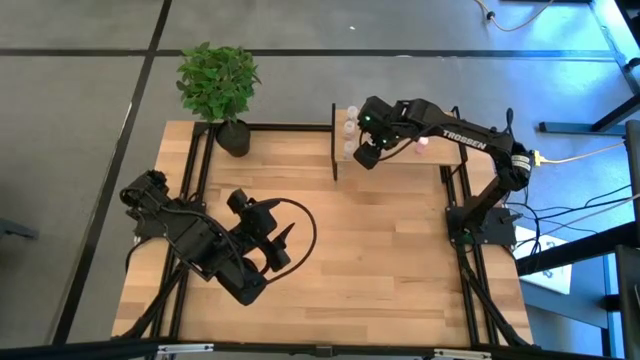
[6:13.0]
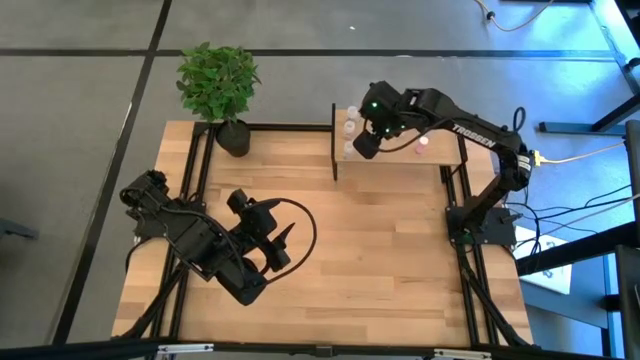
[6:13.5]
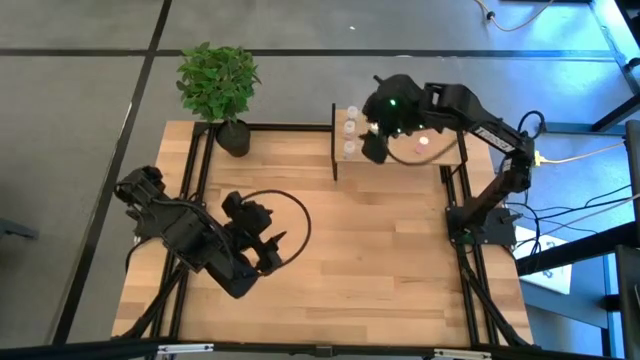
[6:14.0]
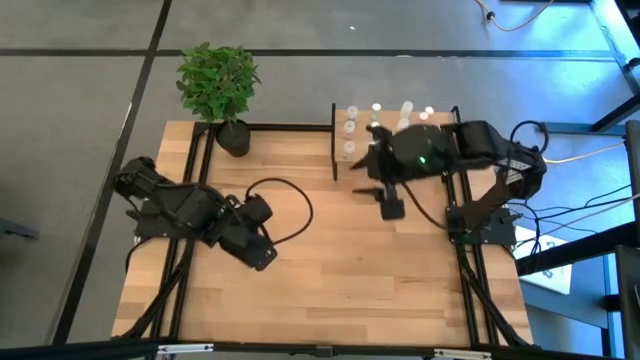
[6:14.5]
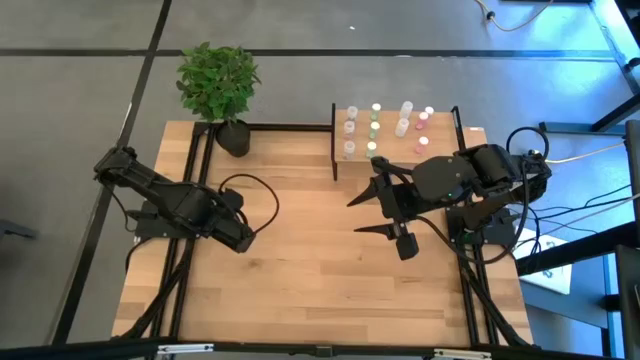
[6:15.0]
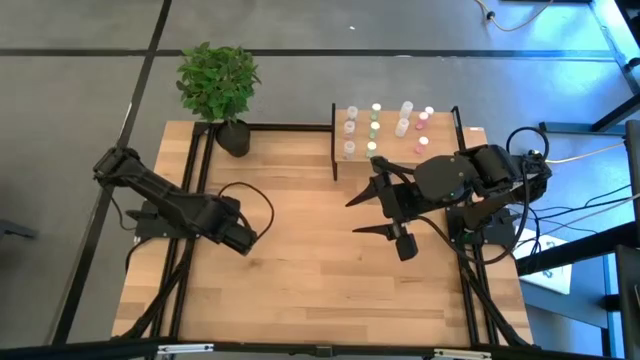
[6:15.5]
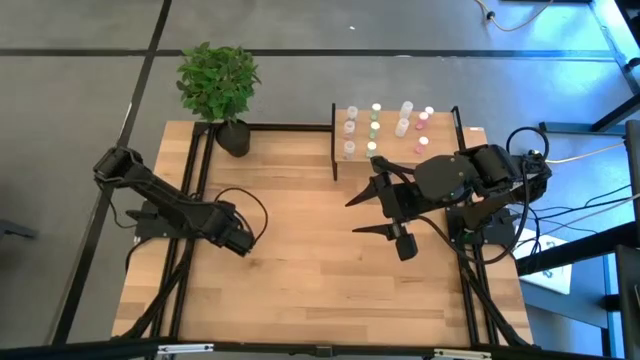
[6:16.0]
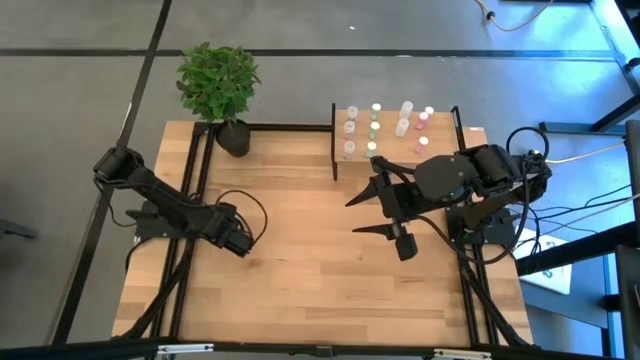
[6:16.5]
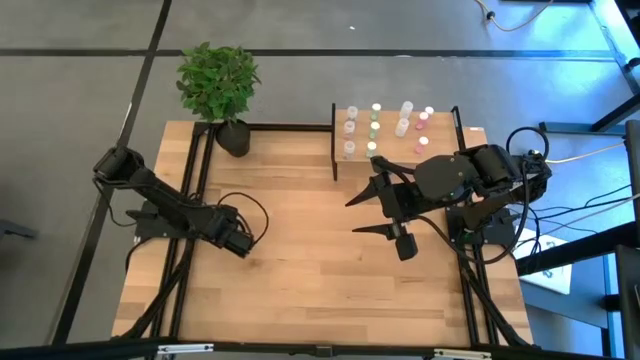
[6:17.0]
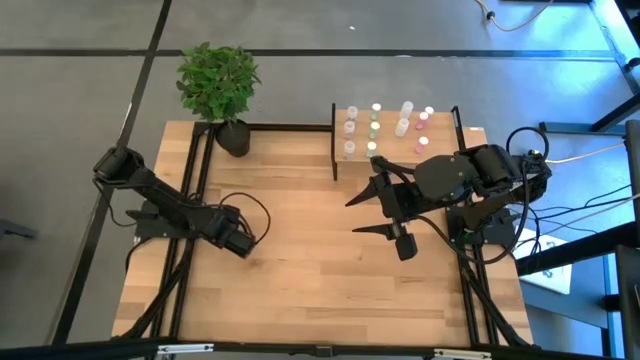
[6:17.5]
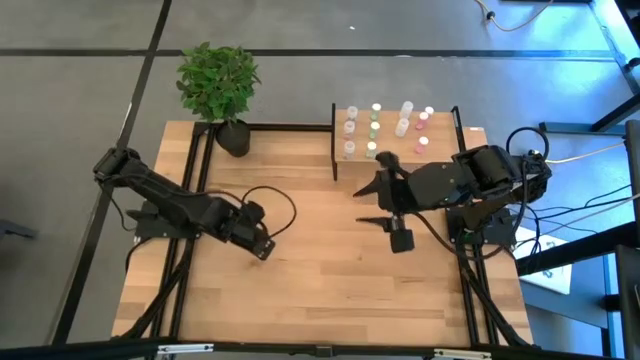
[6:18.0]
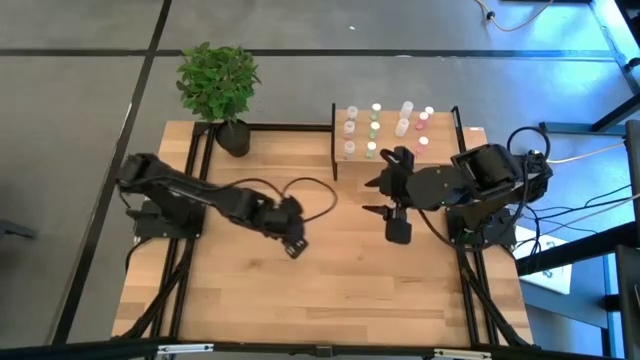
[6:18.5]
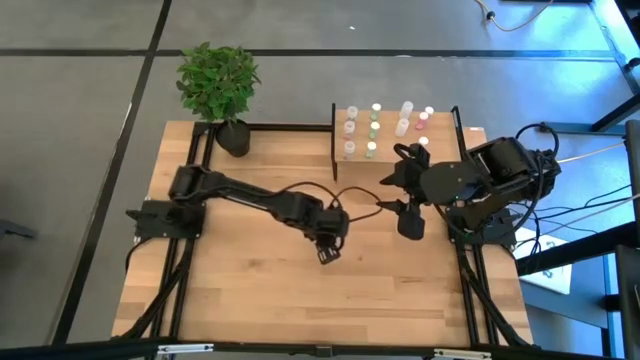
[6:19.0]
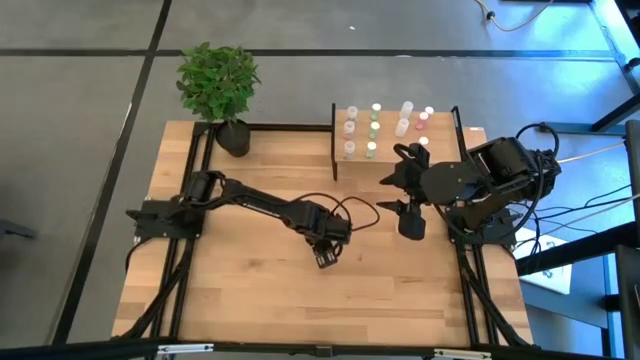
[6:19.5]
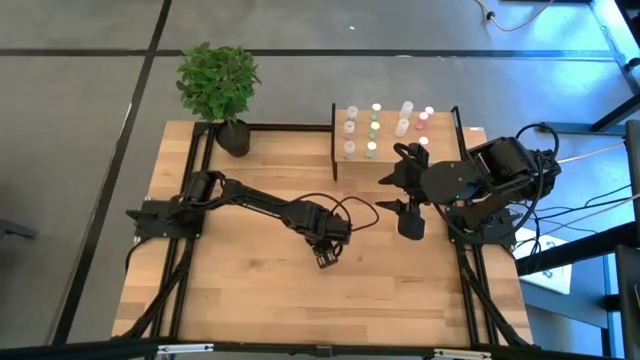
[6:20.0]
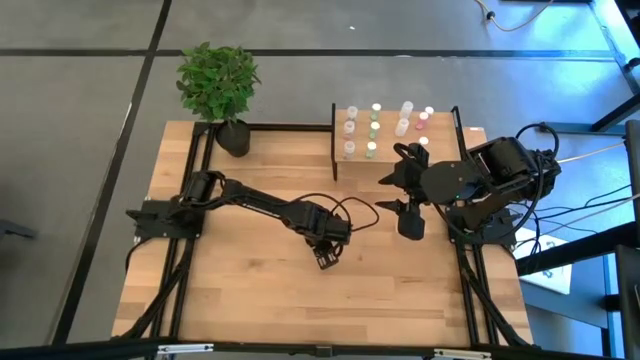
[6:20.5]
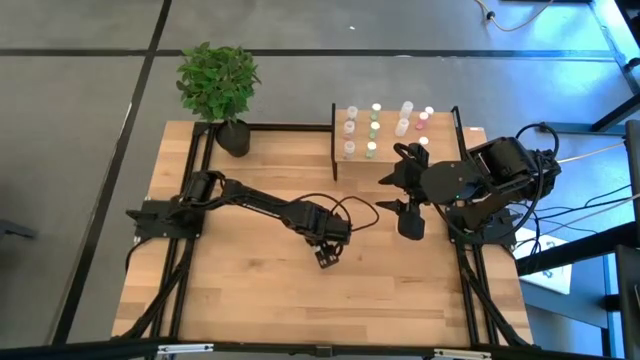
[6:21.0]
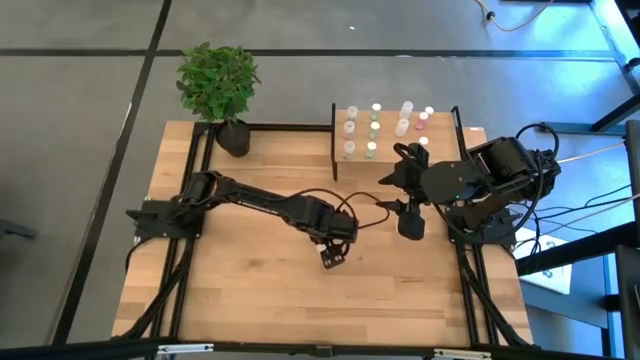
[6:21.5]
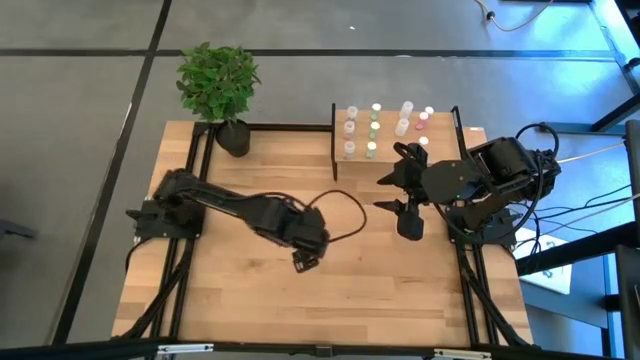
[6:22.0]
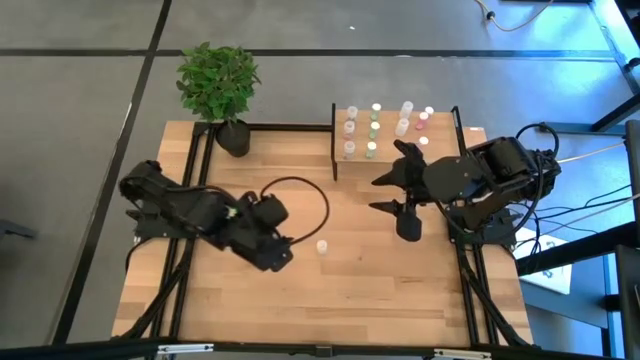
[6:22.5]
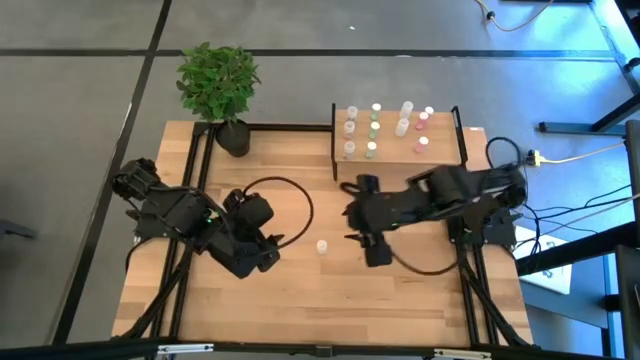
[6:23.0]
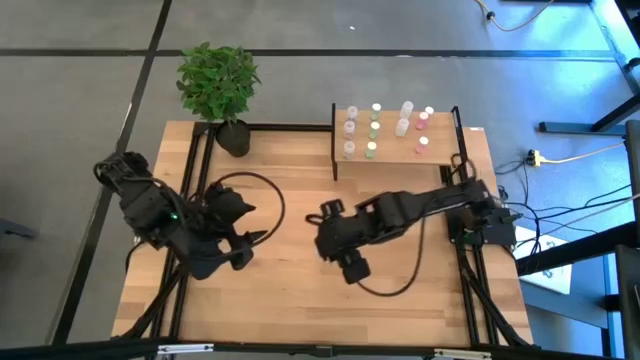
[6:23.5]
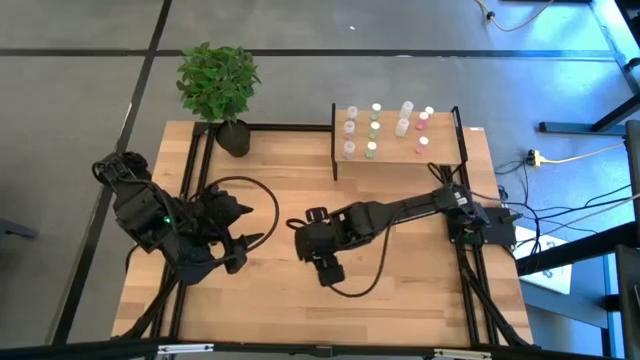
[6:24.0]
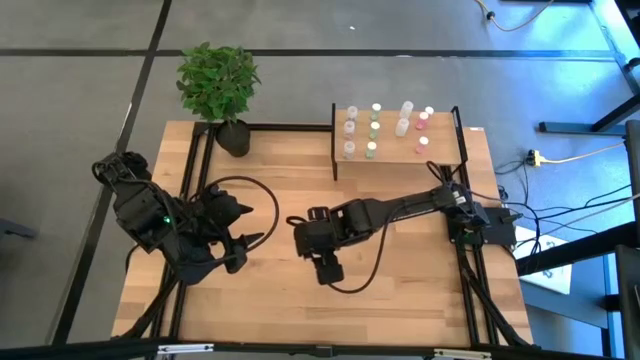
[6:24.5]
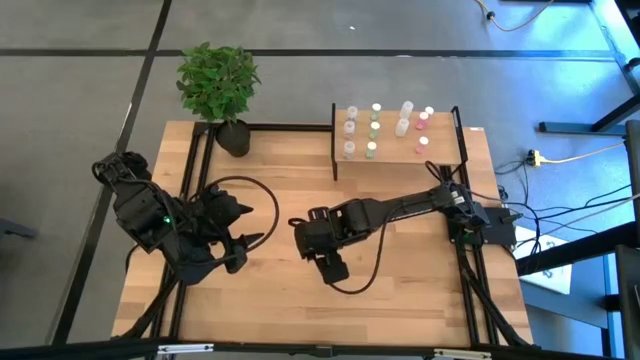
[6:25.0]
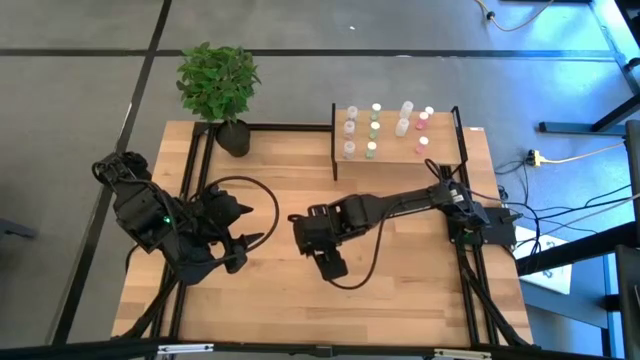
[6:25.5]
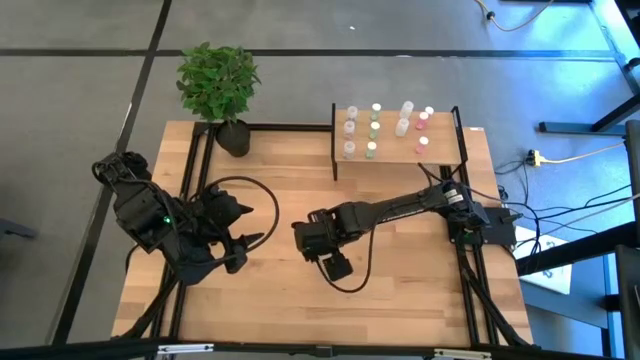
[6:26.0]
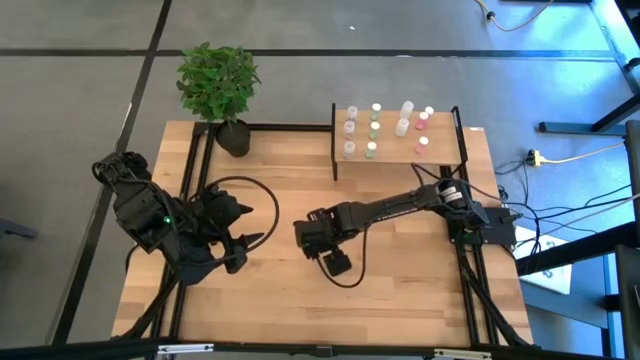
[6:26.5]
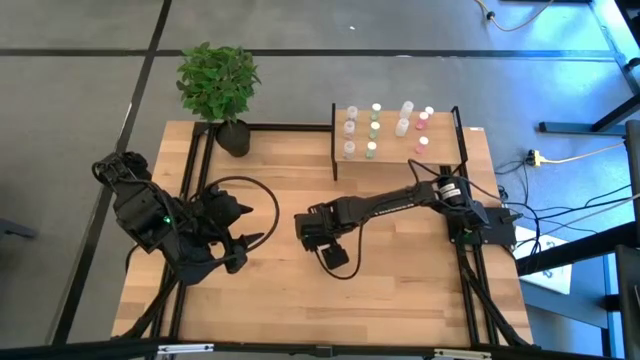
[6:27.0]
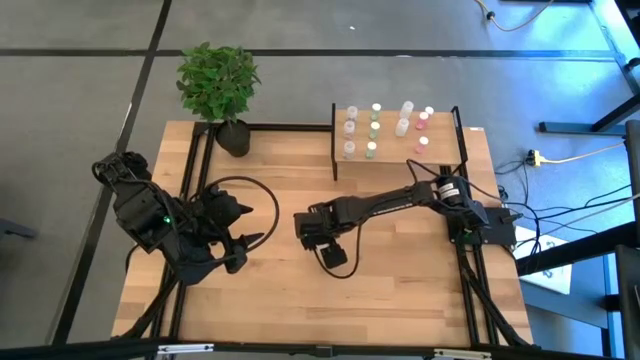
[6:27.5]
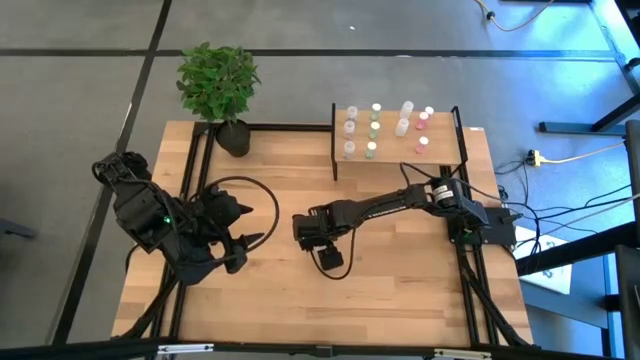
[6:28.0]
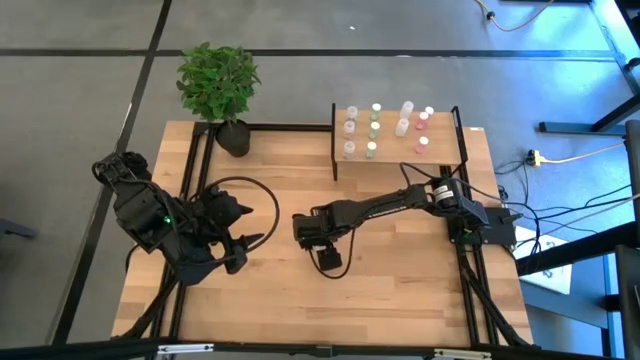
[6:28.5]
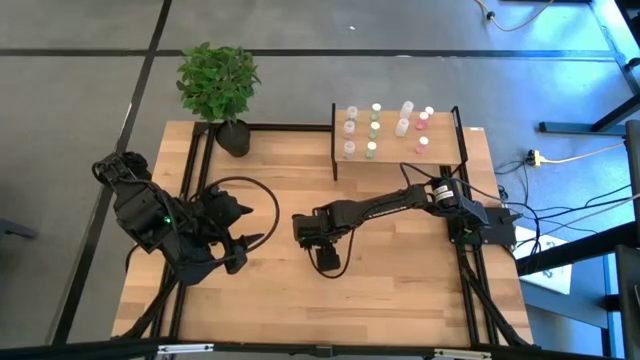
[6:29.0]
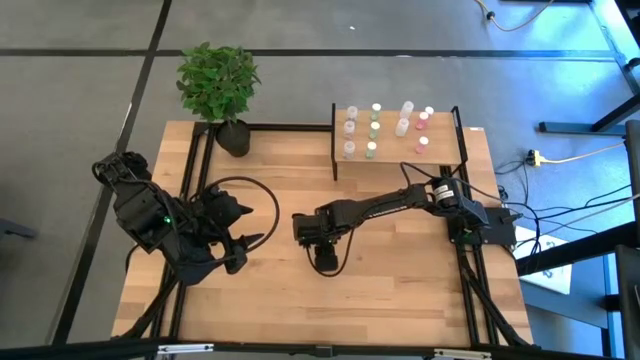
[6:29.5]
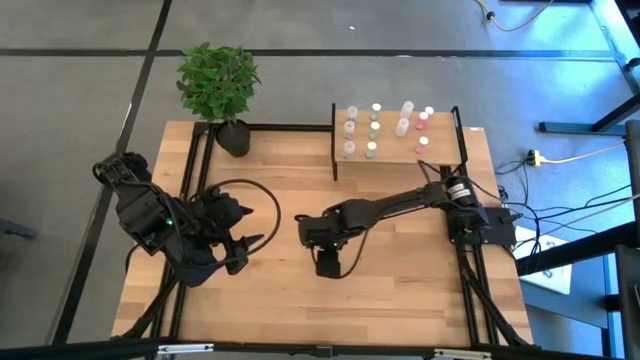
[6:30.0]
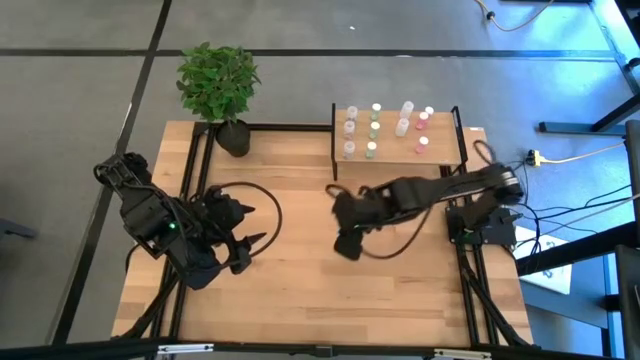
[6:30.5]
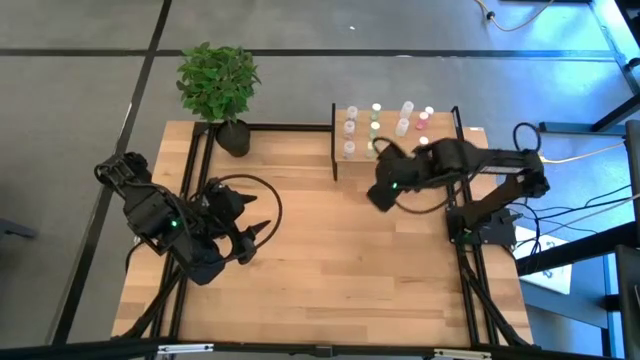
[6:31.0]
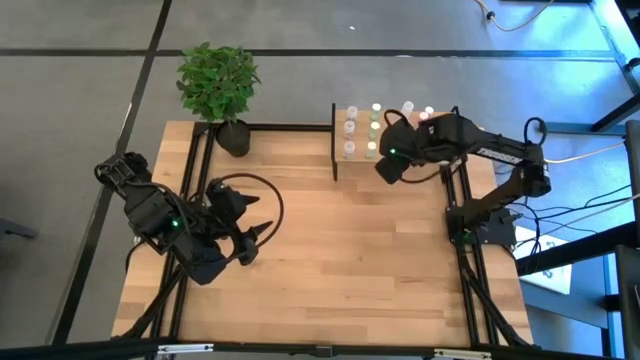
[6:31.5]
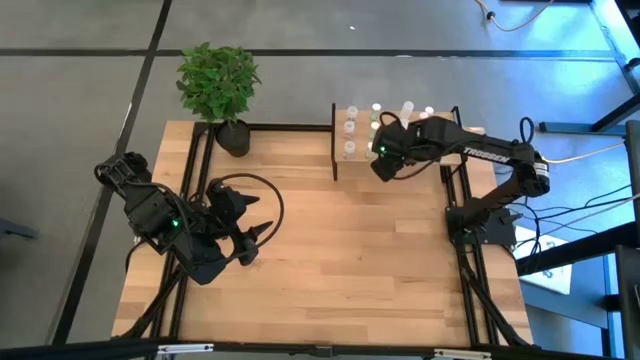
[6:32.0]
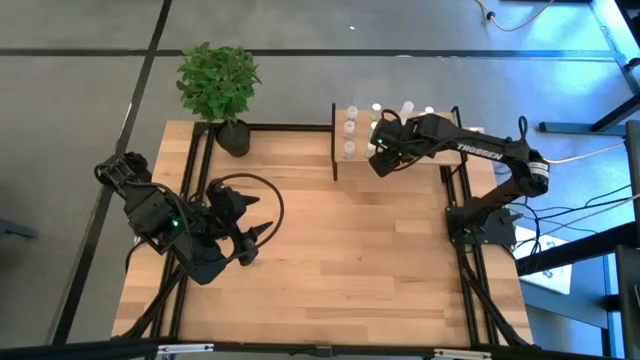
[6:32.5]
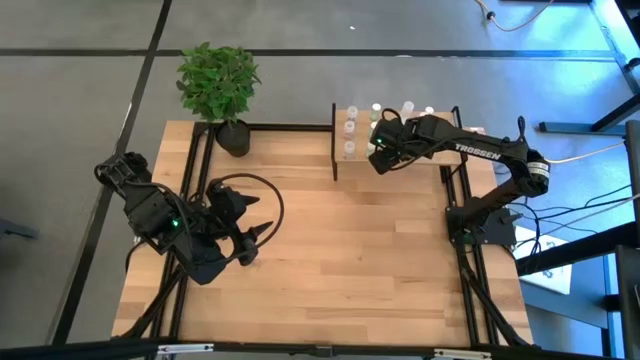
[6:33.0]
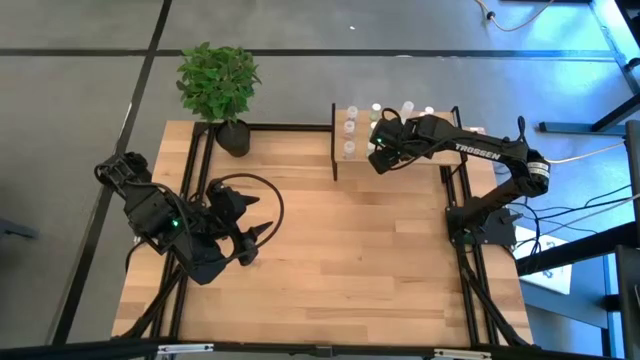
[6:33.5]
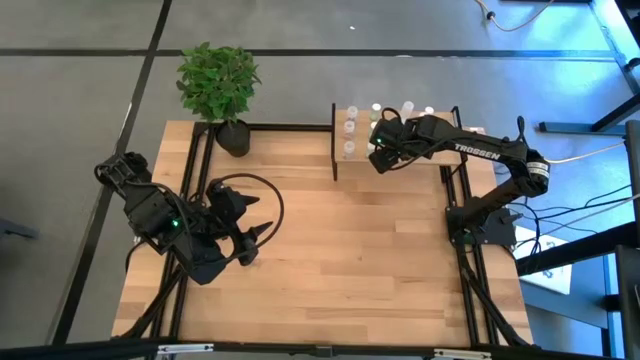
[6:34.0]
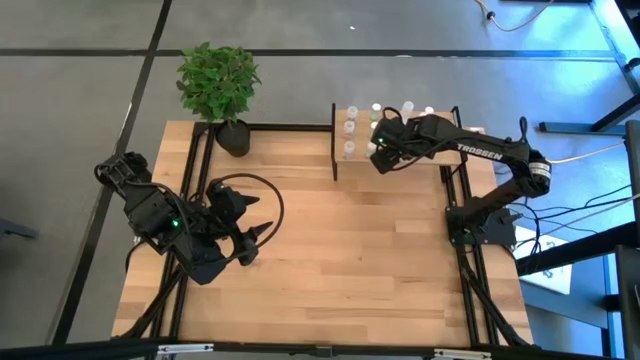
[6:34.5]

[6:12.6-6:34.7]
Task: Pick and place medicine bottles onto shelf by color
Put the white pill bottle aligned with the other white pill bottles on the shelf
